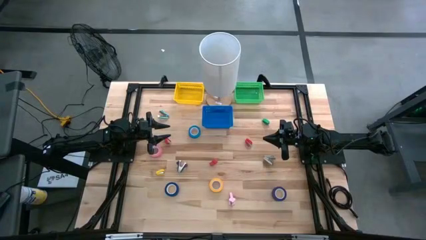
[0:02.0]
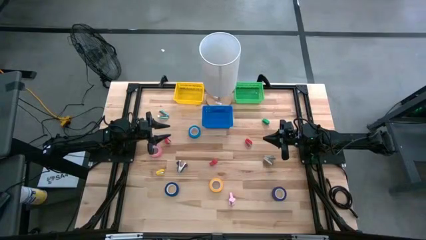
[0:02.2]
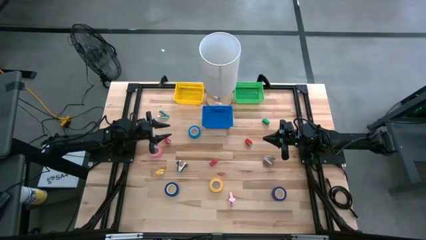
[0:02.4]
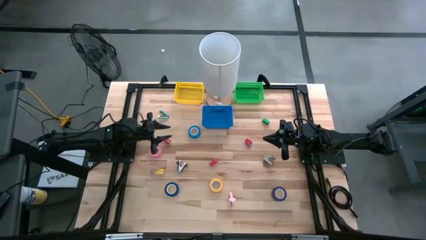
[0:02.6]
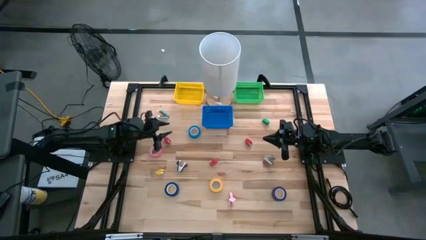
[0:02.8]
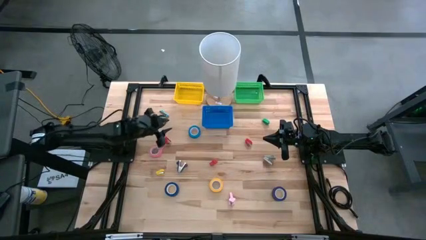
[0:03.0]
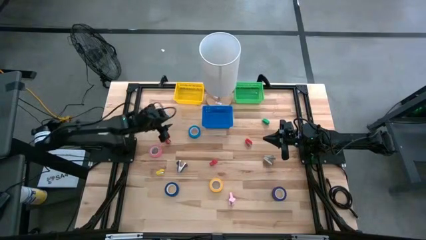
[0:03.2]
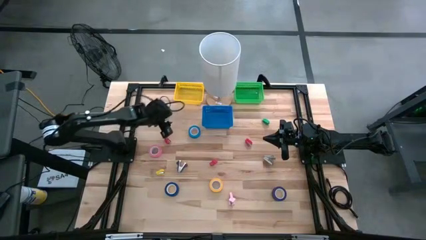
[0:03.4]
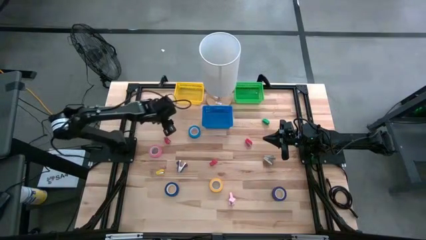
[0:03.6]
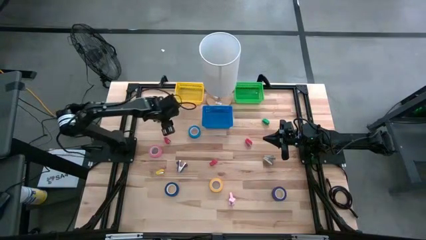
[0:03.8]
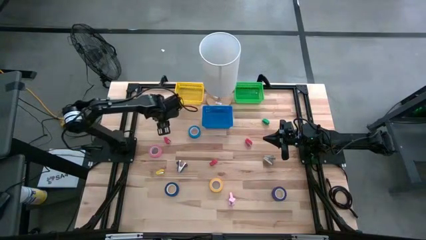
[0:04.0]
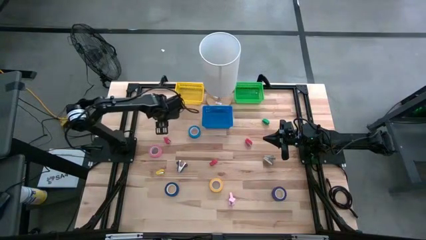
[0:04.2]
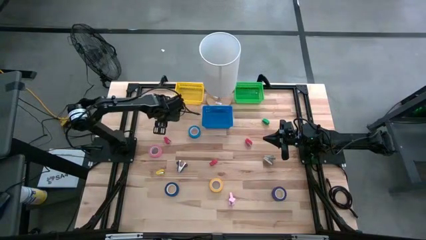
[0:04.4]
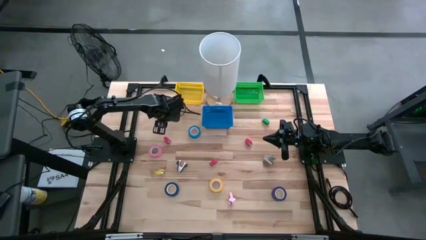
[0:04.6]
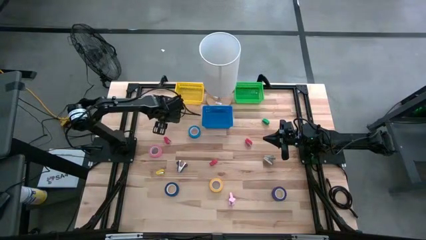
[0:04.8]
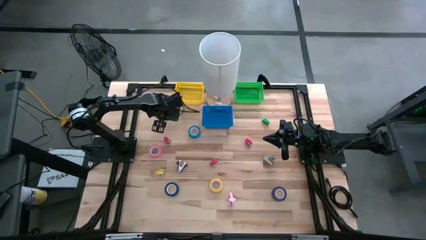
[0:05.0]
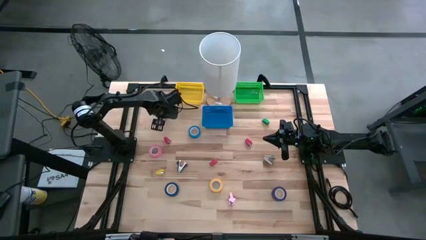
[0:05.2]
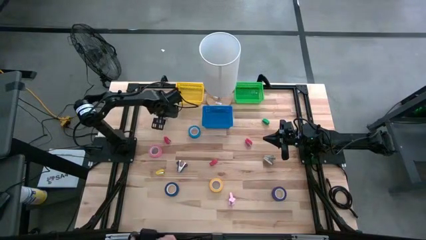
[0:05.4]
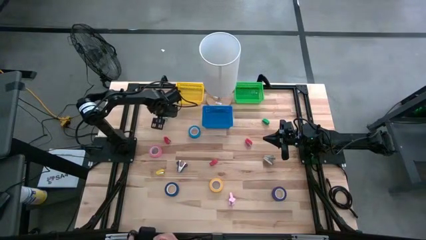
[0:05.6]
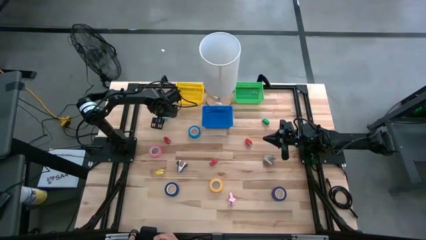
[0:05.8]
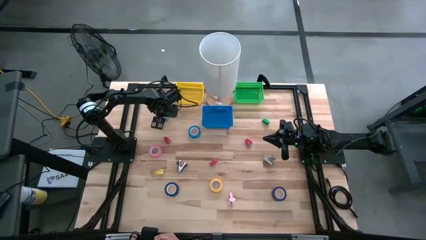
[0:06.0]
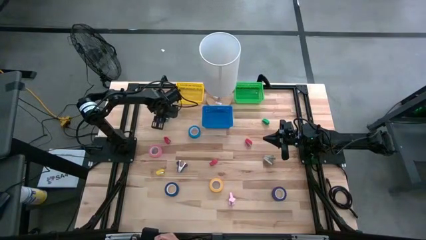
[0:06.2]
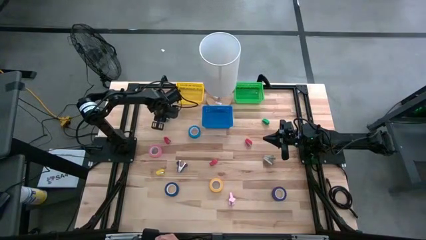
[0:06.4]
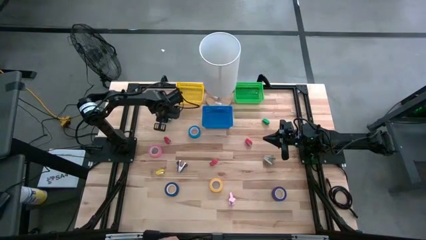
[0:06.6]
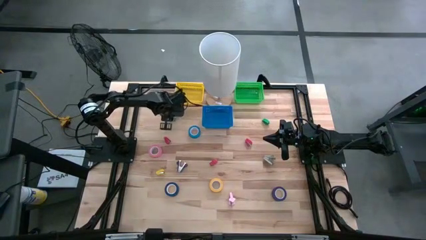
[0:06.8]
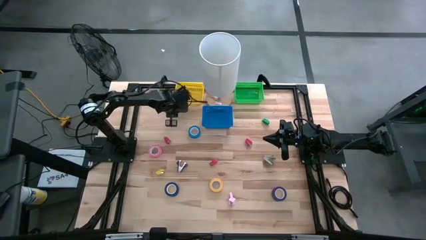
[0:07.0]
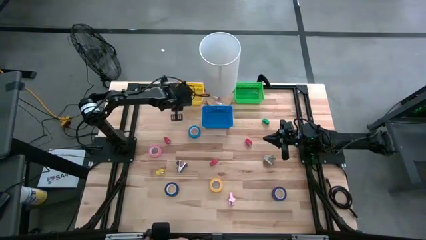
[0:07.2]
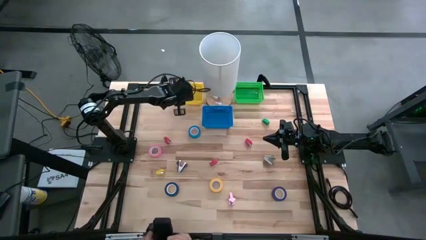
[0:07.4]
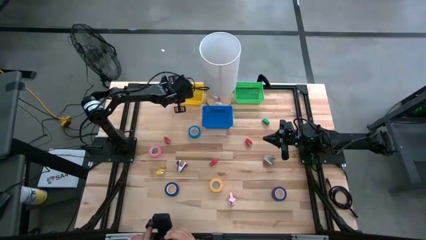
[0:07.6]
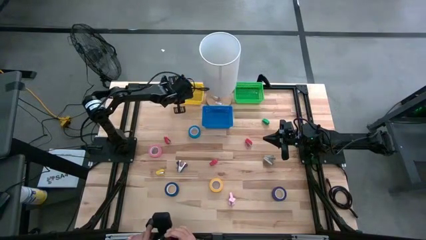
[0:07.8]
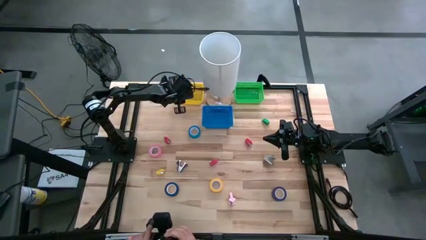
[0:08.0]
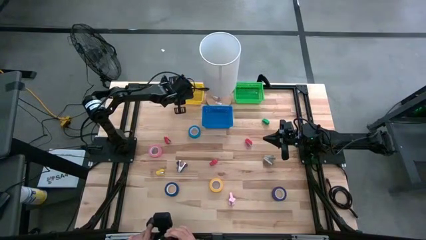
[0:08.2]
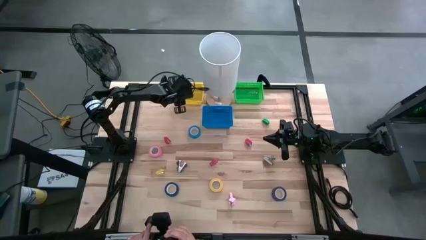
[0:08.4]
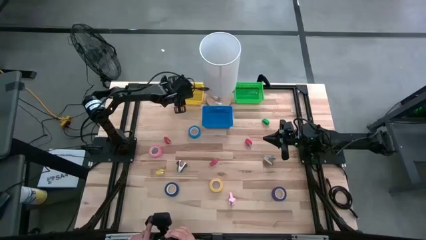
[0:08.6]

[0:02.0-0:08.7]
Task: Pick and place Stapler, Stapler remover, tape
Put the blue staple remover into the yellow basket

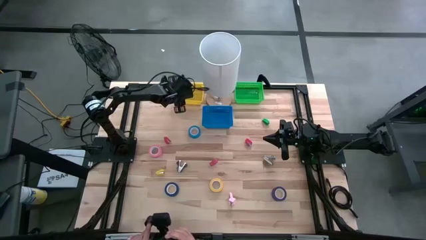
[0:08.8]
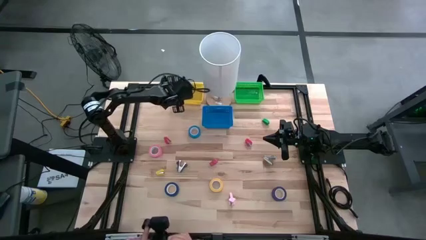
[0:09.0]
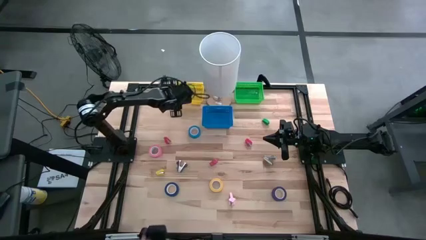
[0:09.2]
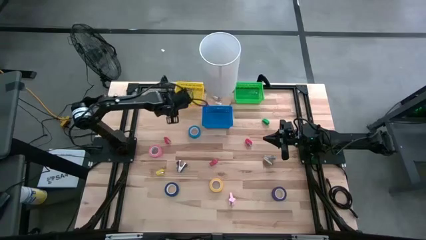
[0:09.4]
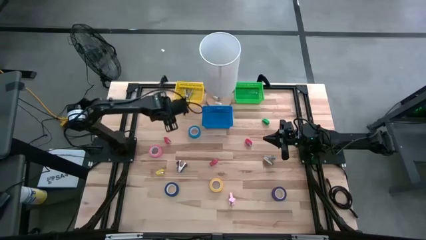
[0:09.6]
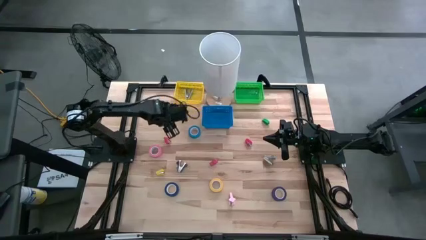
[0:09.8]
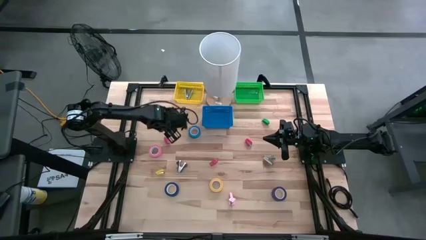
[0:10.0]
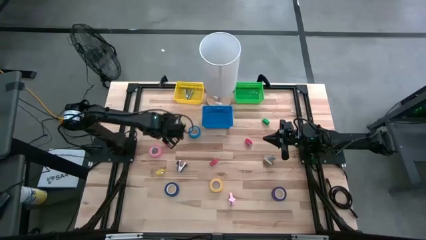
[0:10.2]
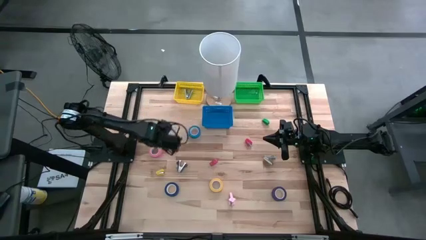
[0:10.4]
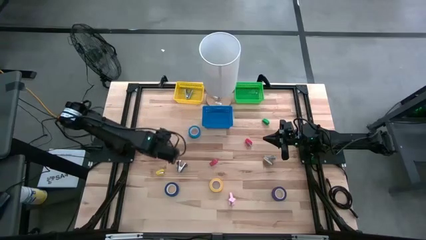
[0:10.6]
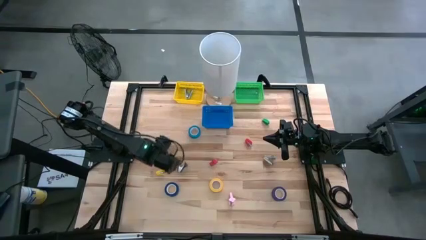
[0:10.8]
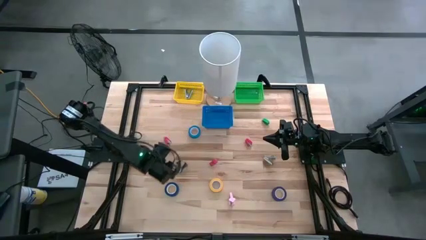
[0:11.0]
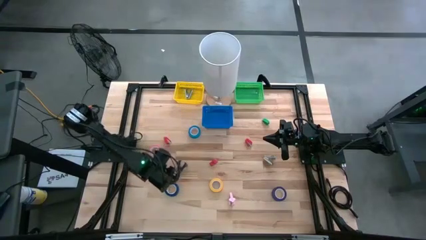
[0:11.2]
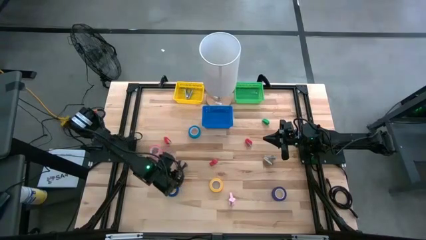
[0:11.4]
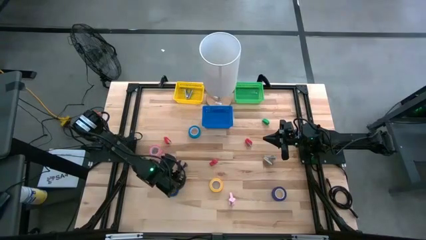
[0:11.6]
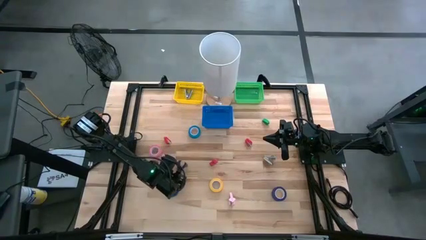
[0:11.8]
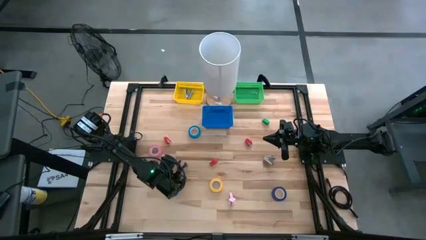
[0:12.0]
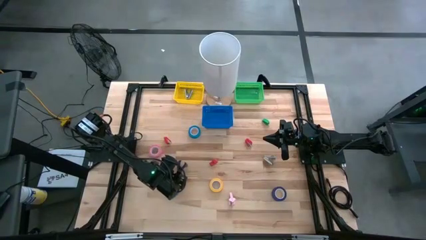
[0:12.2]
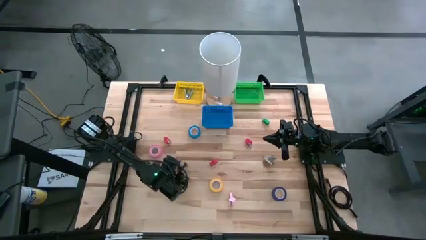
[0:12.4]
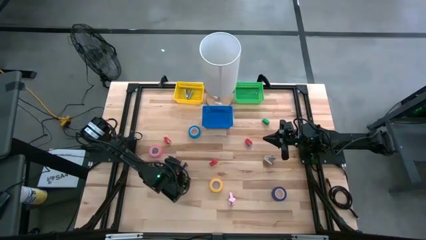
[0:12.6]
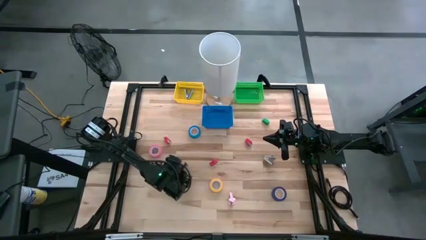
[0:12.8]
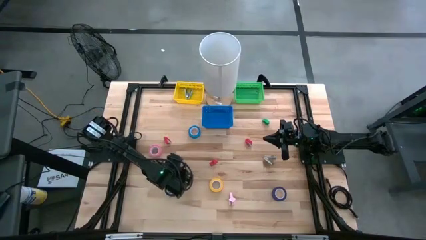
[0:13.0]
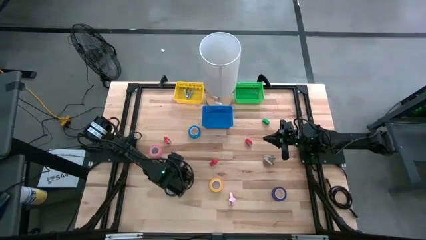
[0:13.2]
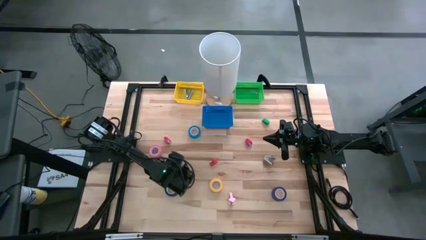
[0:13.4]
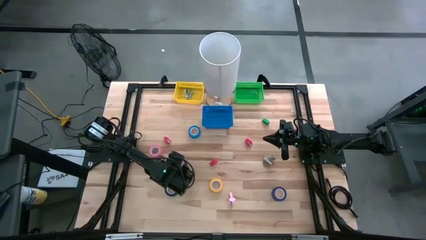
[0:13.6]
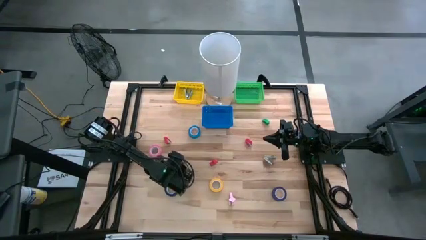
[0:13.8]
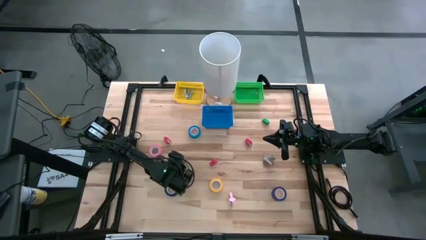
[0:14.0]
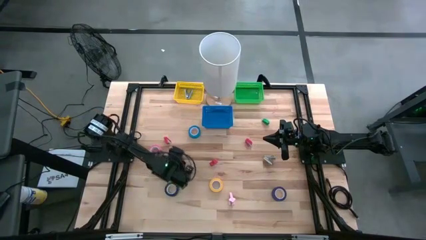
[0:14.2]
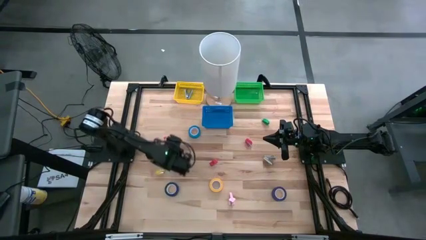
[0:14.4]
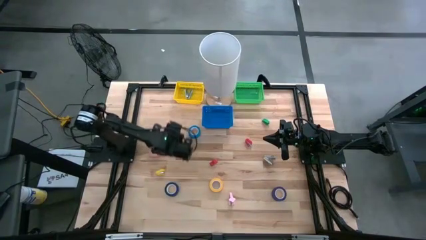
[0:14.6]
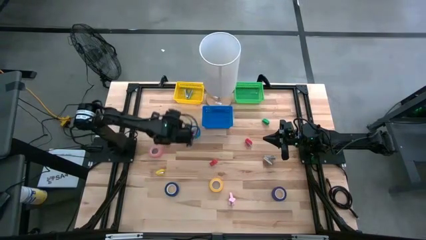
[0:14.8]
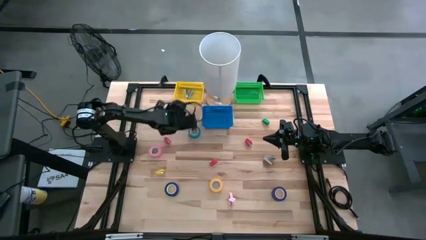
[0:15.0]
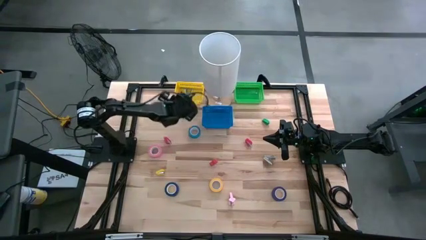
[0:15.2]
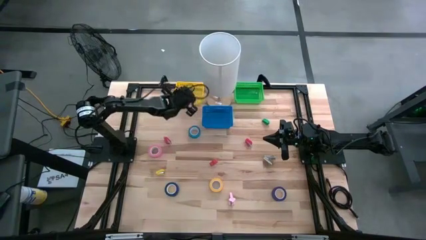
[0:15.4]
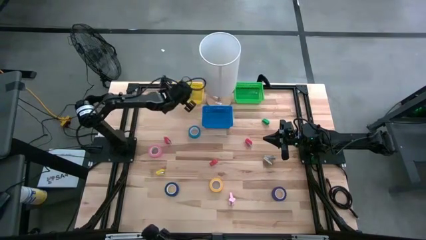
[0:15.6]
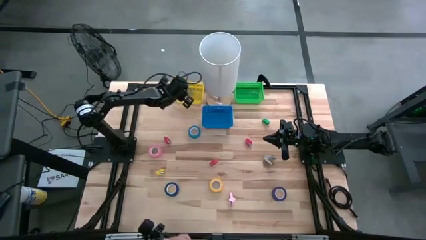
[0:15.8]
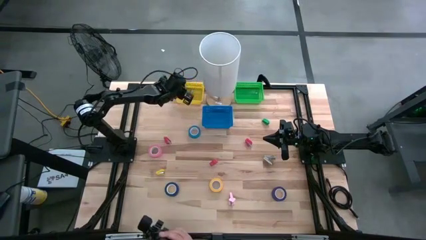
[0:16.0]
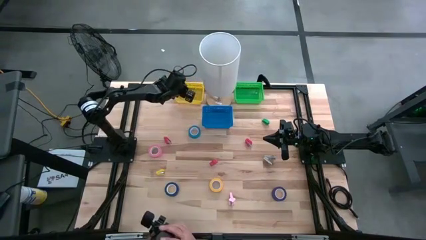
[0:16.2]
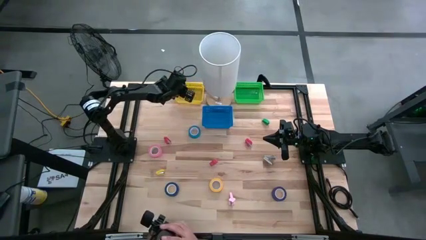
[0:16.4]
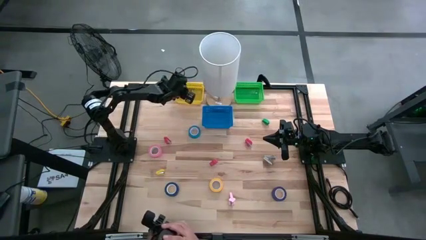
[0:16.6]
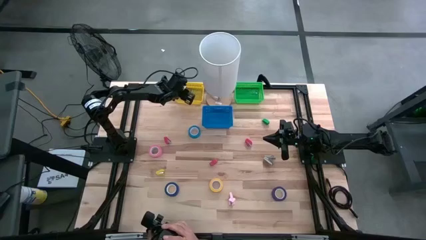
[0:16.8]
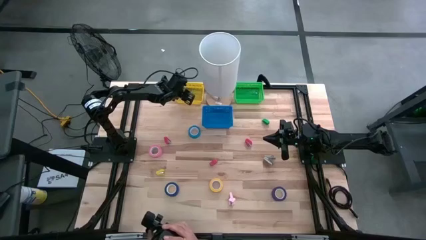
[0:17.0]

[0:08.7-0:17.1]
Put the black staple remover into the yellow basket

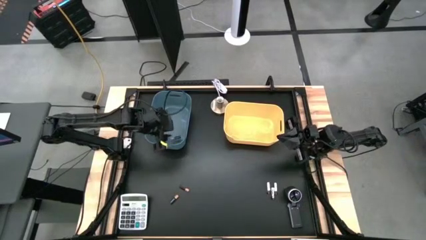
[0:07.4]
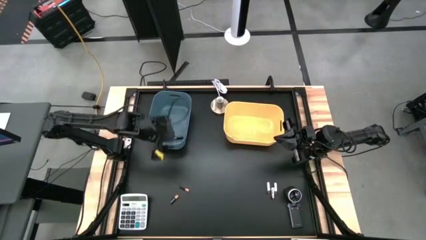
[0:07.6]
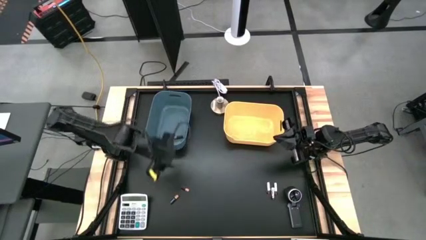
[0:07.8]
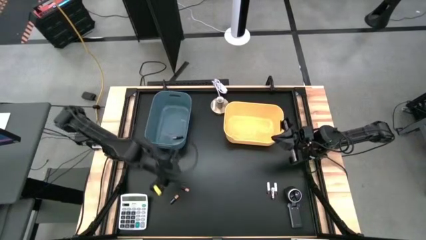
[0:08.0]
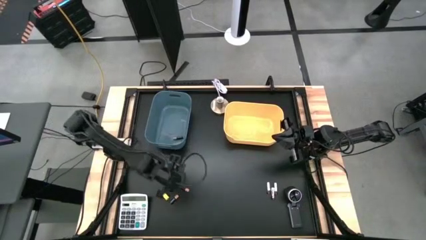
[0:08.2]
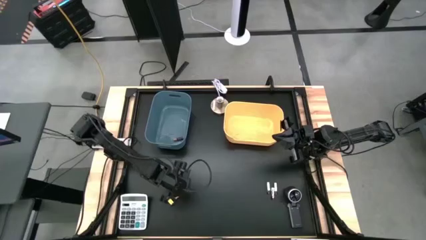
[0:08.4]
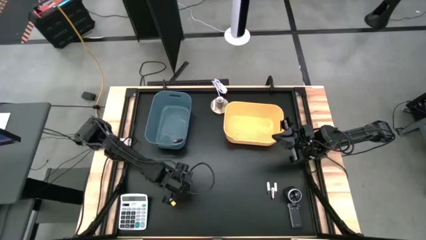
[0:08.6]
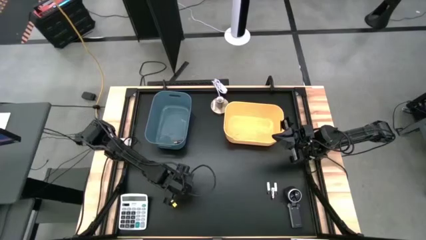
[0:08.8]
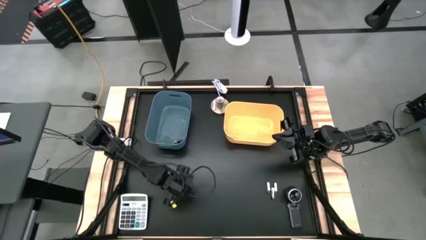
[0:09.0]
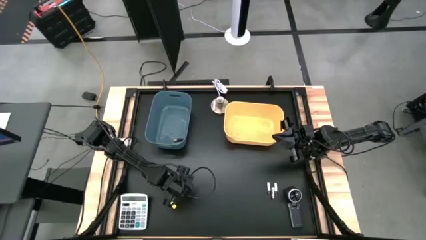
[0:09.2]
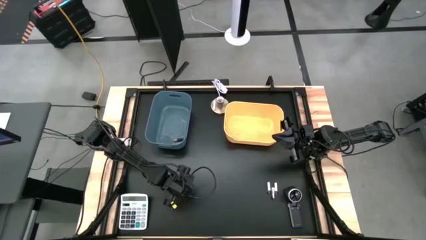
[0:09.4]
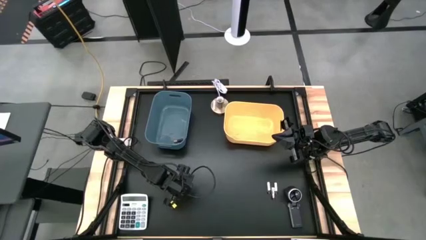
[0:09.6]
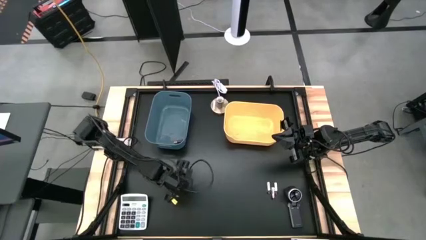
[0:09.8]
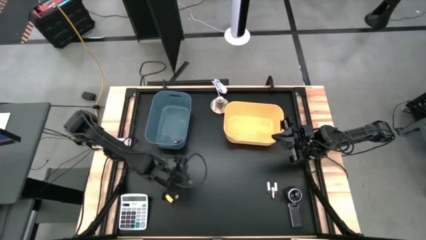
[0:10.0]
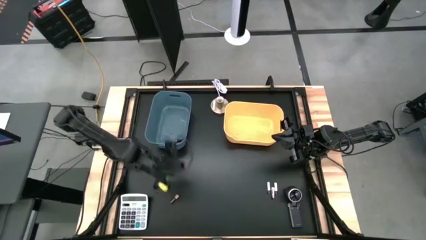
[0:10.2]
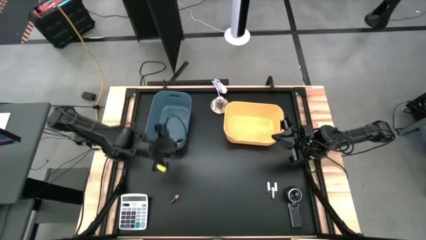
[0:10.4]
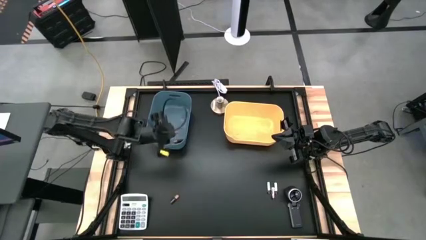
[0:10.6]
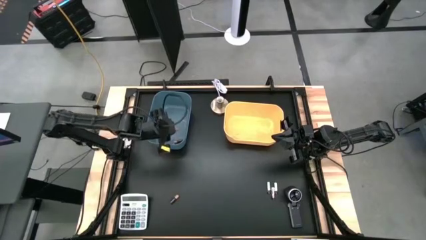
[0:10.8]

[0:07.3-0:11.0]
Task: Sort batteries
Put the top black battery into the blue bin
